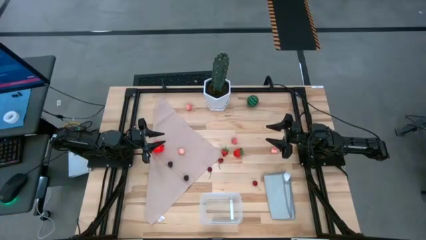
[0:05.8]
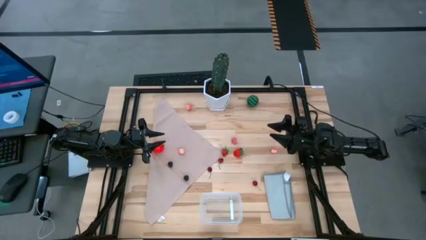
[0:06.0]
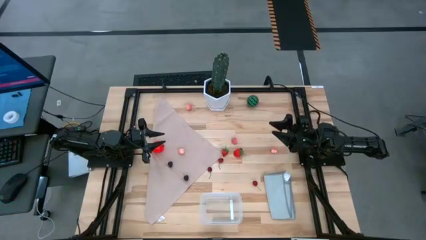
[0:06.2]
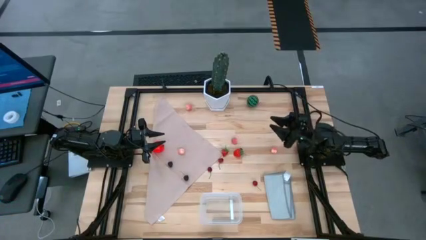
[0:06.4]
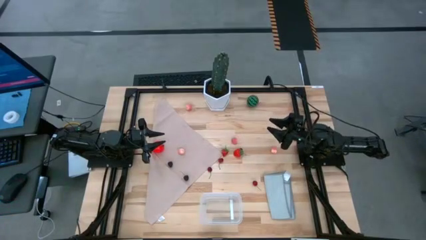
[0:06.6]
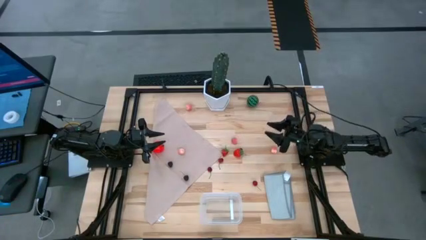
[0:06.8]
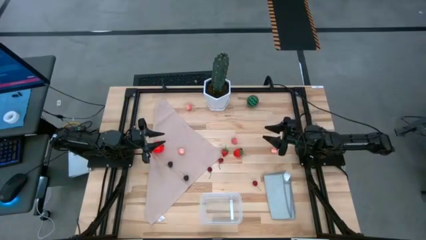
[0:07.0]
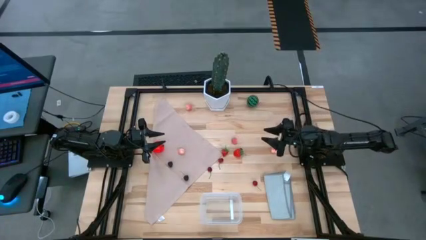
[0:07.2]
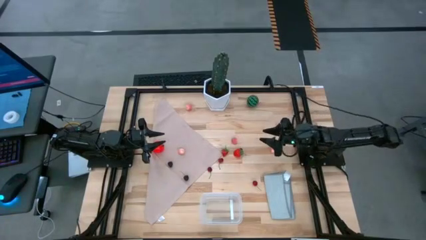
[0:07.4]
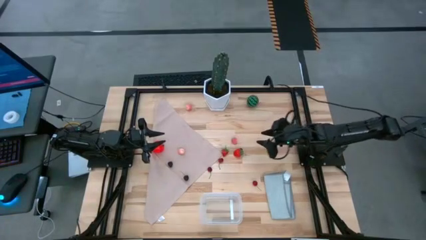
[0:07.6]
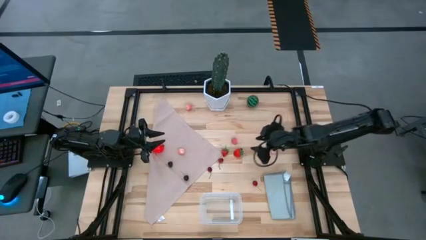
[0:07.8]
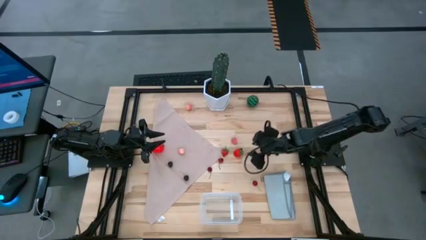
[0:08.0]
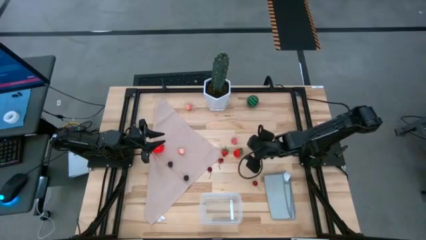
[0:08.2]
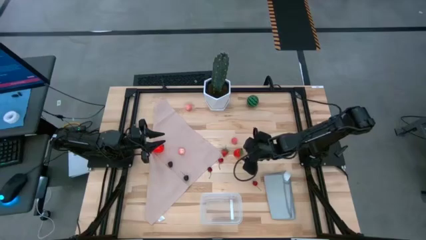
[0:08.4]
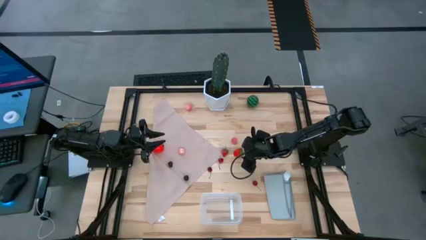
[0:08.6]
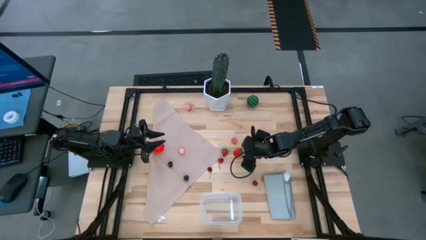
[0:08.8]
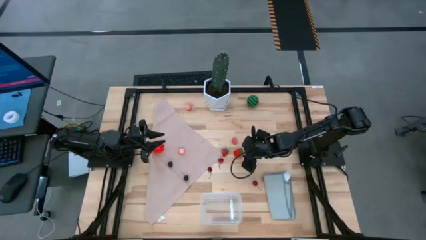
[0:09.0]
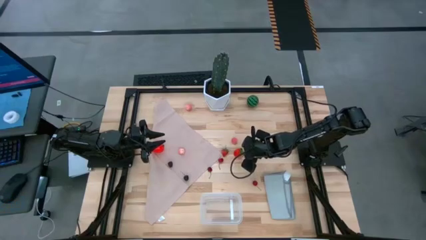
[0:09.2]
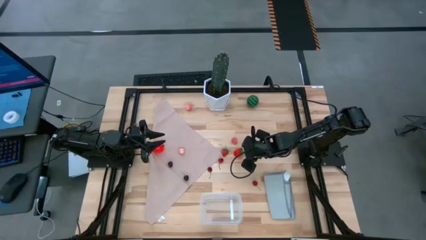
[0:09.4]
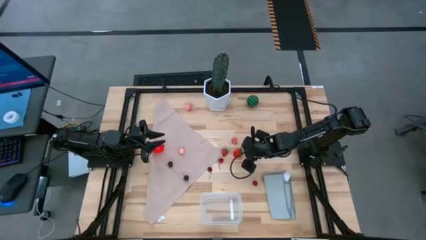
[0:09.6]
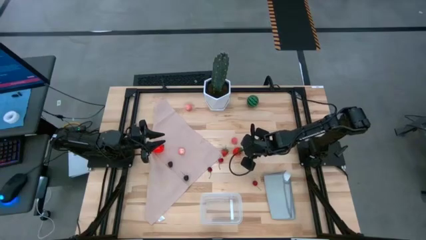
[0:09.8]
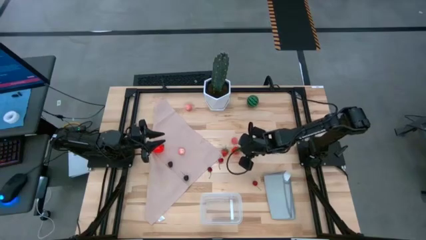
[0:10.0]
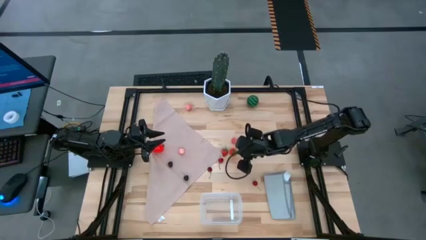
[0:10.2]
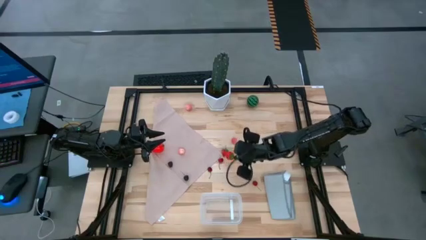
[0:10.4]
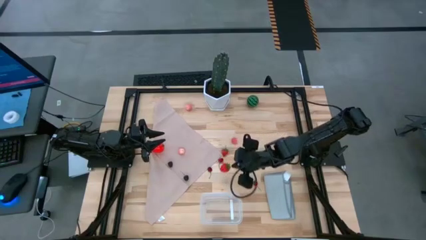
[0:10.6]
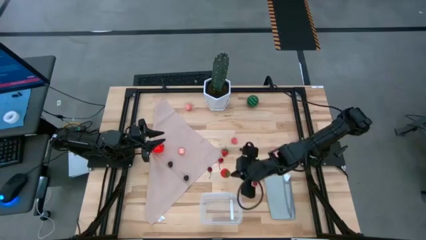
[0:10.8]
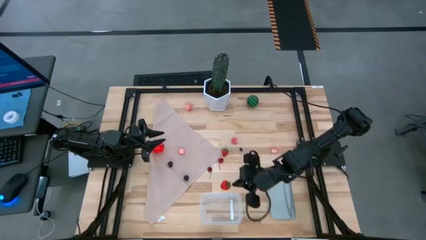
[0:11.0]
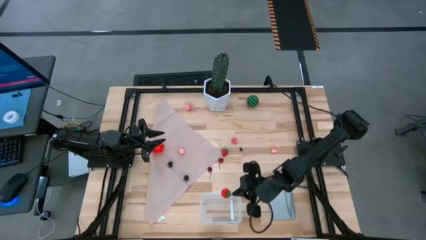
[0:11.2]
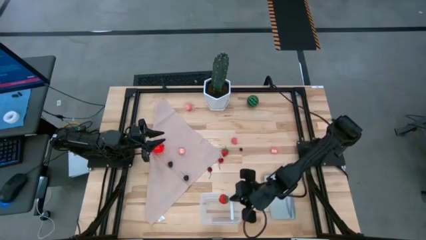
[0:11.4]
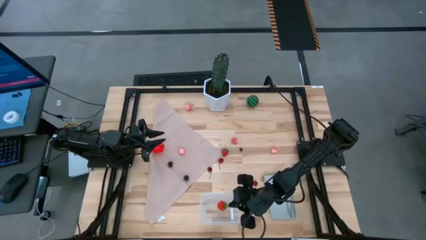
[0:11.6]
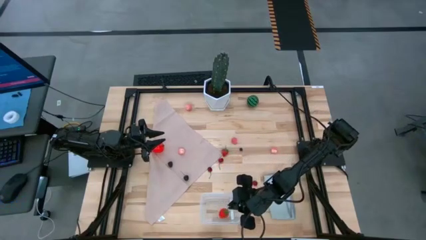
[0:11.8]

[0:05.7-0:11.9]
Task: Pick and placing Produce into tupperware
Put the right strawberry into the transparent bin

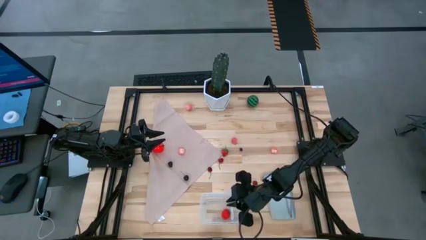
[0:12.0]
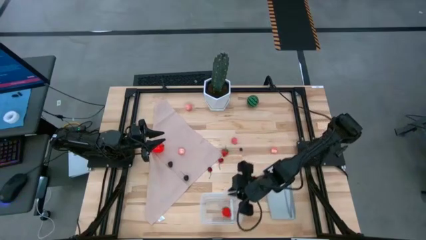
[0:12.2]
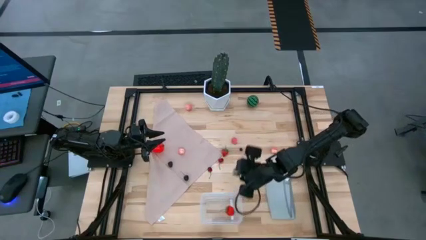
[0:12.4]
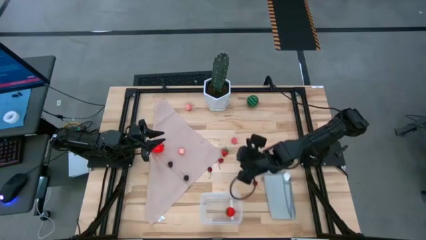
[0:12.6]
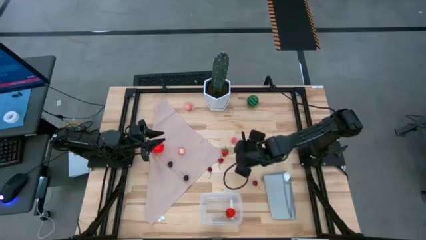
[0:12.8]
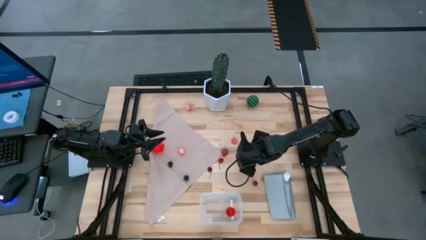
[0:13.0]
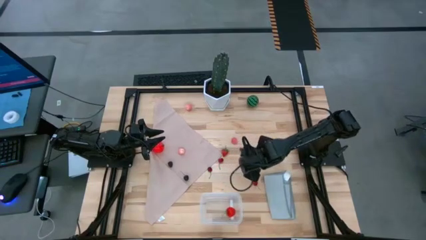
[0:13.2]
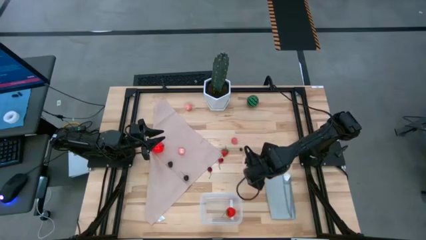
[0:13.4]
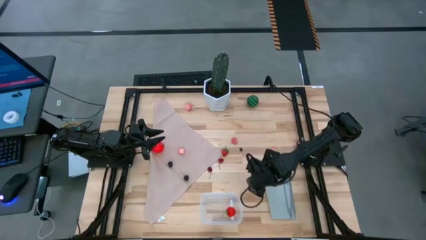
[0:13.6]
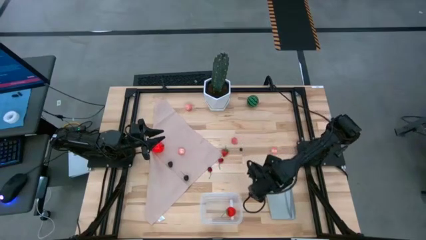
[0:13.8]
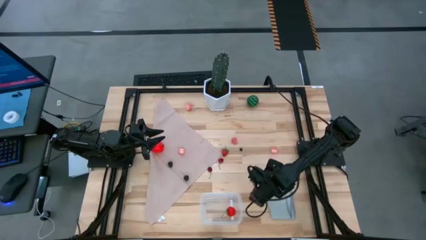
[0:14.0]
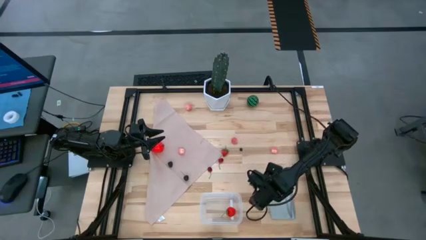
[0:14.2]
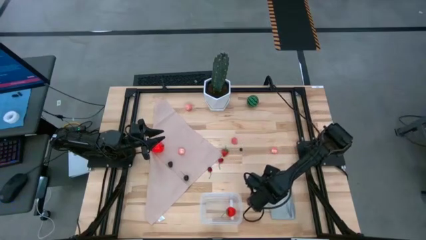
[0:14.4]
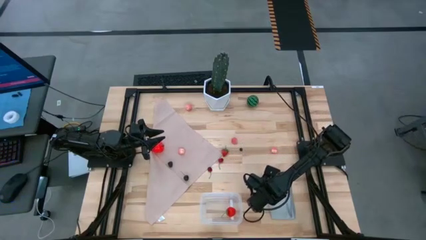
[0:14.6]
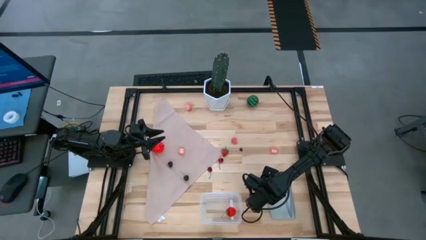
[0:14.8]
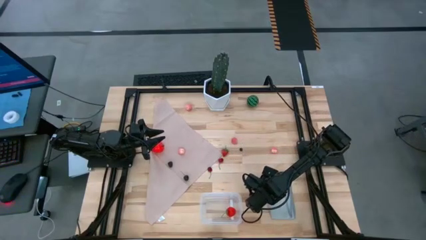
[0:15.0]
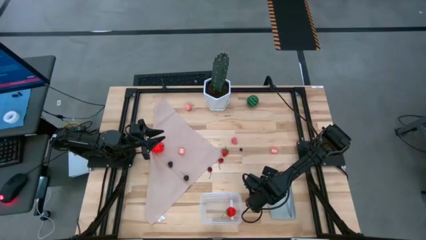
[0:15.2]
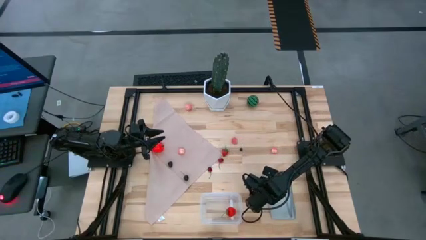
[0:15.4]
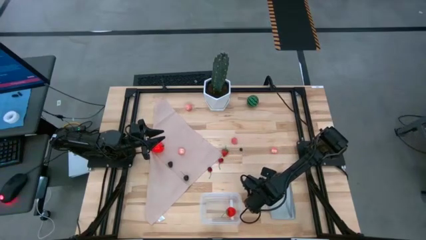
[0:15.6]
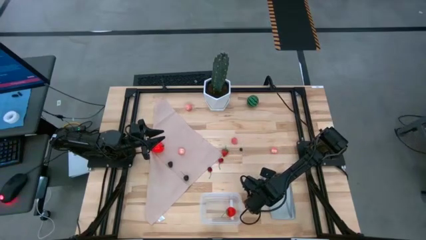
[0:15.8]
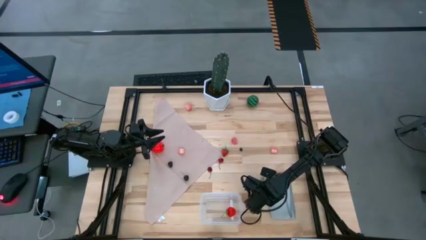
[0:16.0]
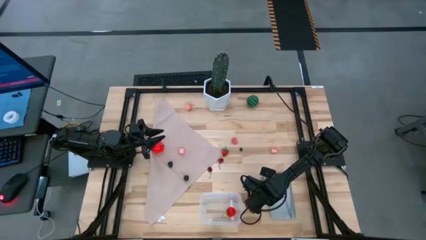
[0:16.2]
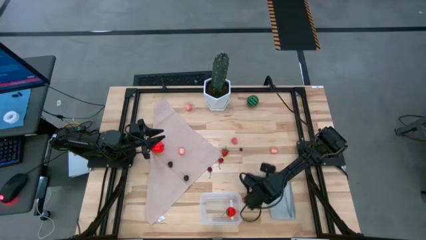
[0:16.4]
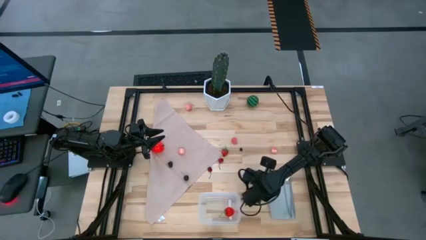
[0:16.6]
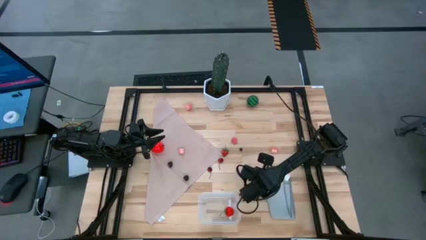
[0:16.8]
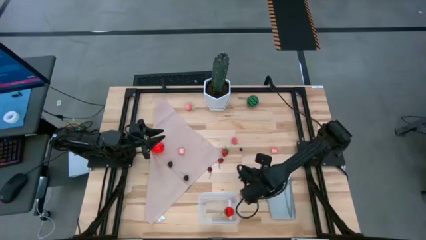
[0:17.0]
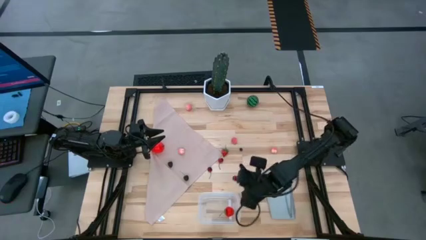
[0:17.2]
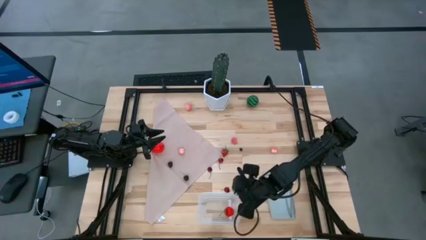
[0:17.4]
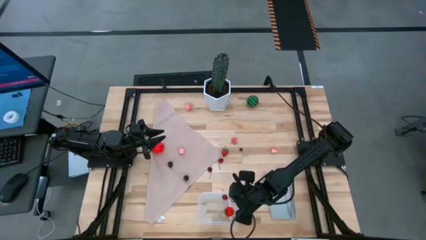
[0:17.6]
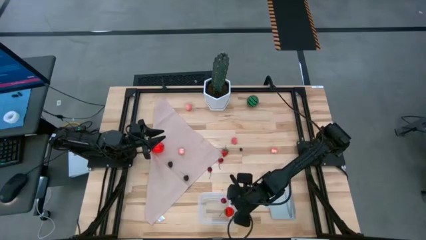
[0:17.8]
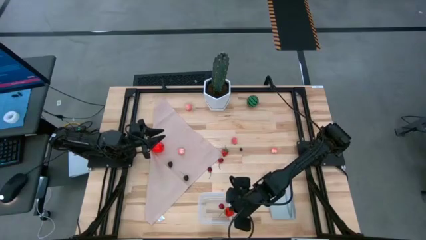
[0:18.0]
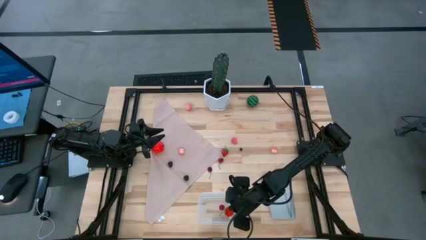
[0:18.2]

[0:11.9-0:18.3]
Put the bottom right red cherry into the transparent bin

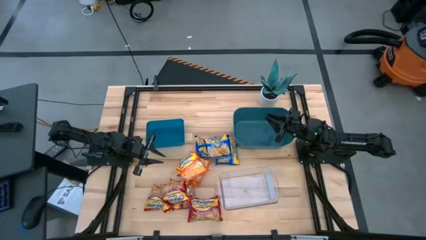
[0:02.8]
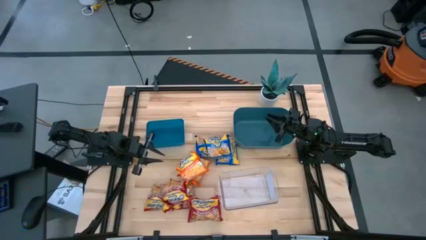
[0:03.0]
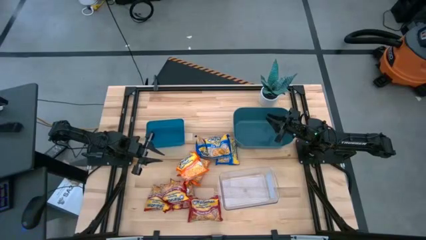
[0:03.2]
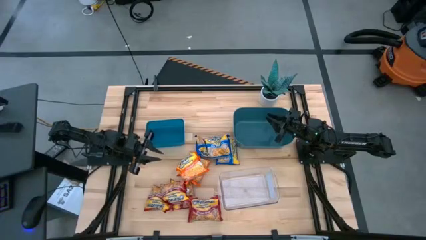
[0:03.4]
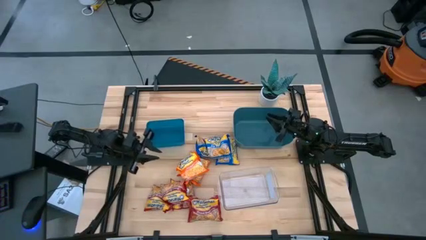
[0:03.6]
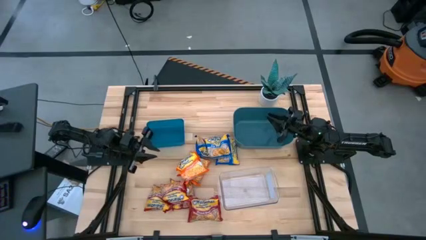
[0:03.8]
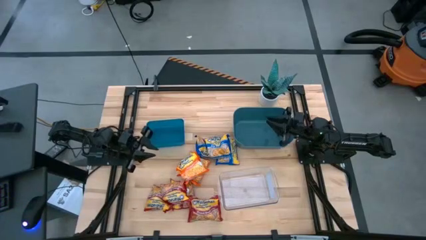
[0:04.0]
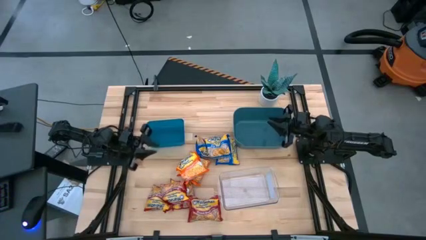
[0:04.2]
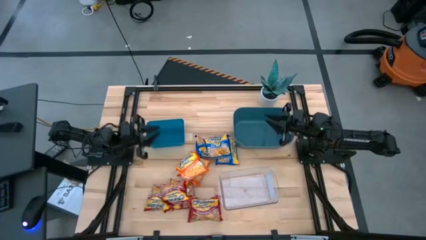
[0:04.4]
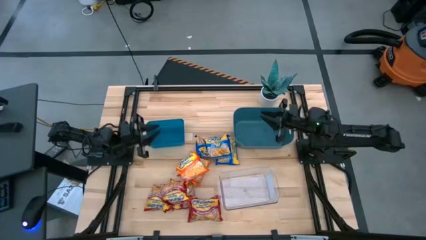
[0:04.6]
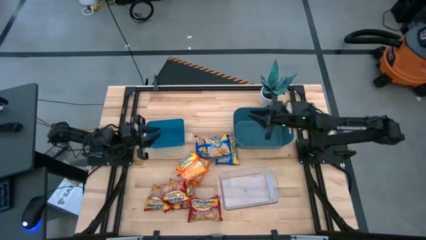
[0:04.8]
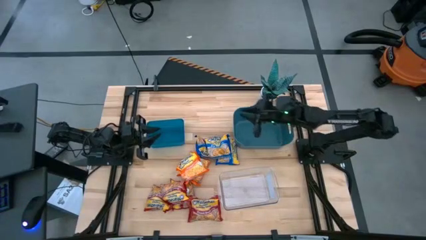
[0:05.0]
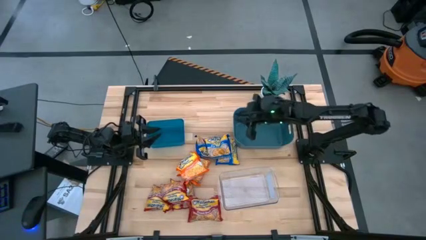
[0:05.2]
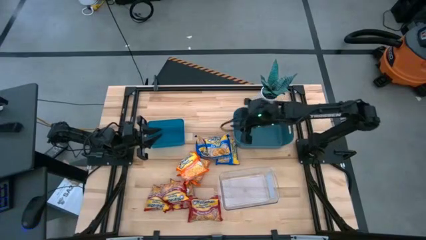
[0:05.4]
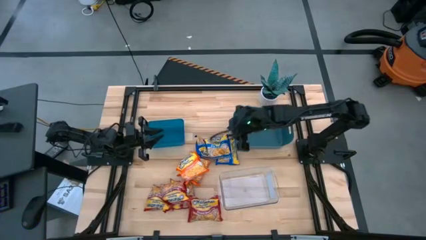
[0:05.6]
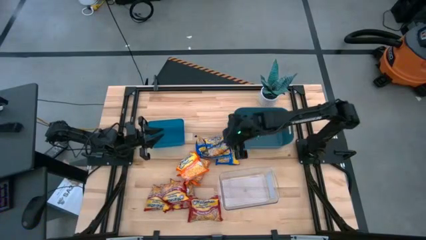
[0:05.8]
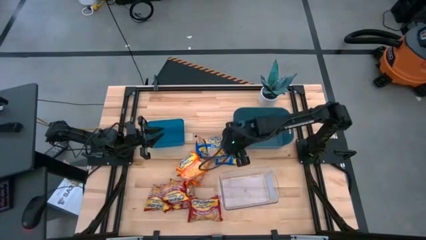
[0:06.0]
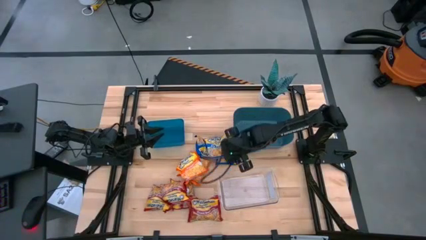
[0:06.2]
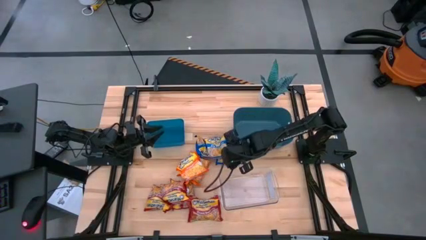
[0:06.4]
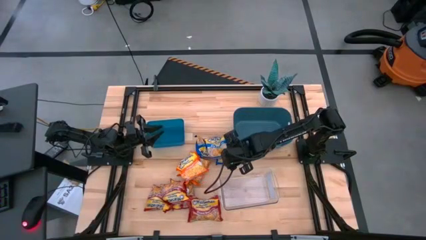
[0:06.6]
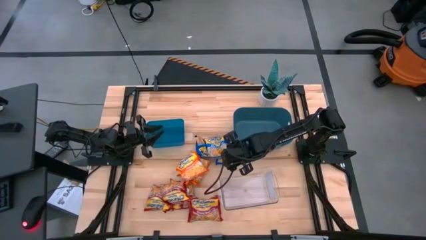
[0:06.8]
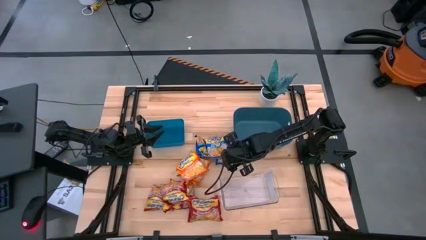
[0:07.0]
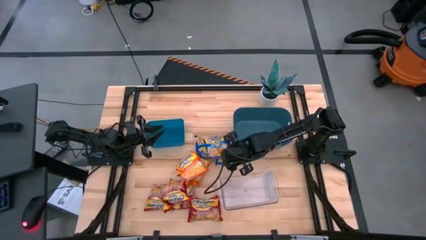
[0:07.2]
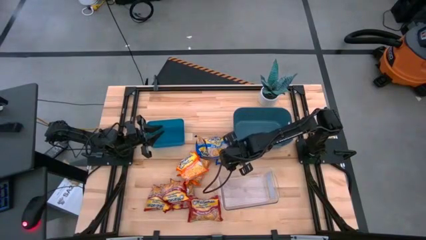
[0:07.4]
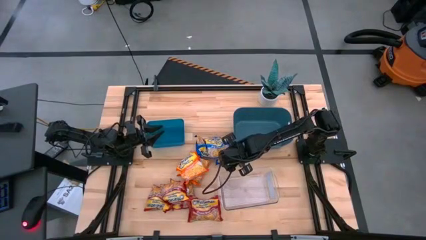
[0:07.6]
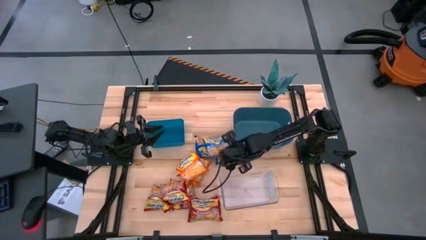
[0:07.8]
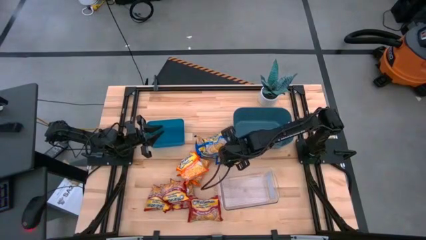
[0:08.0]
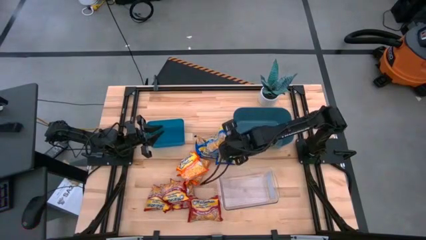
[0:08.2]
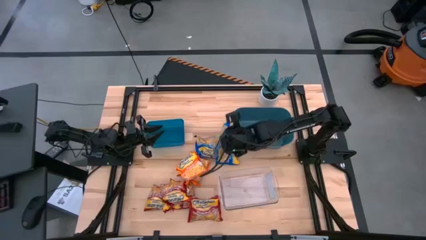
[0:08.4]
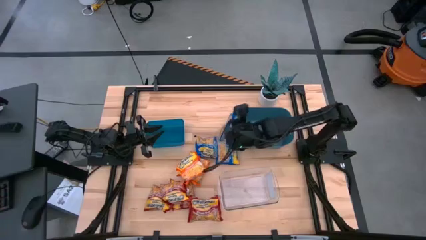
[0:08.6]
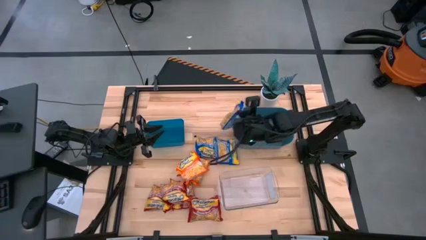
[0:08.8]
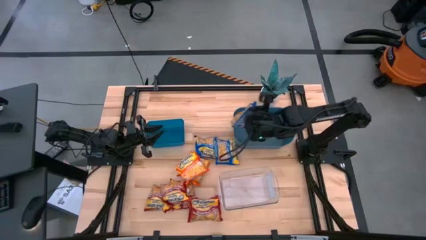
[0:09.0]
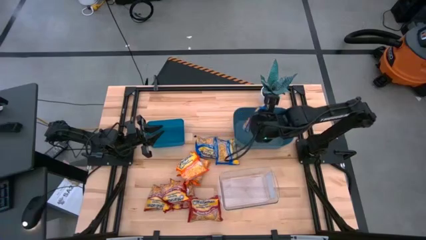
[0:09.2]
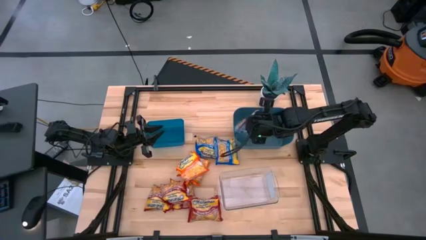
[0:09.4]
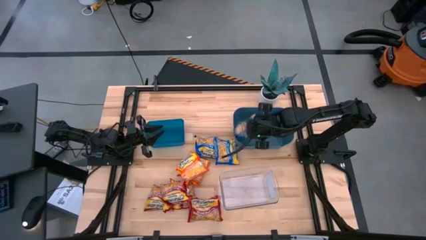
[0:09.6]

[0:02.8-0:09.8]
Task: Sort Maruchan noodles
Put the blue noodle pack into the dark blue bin
